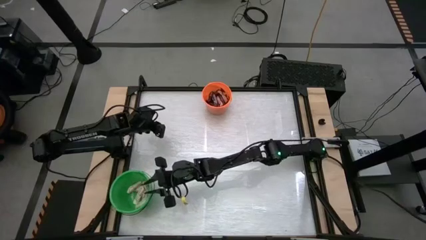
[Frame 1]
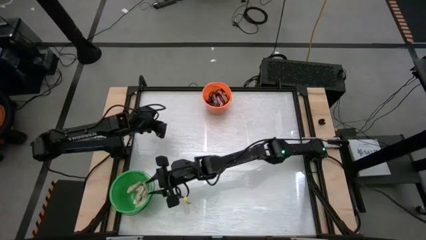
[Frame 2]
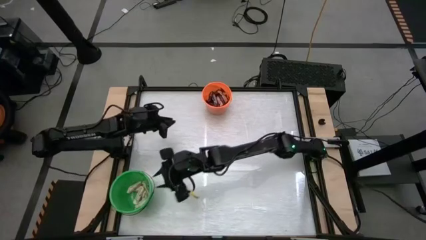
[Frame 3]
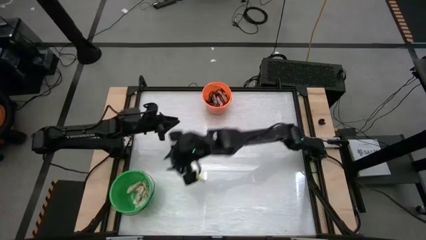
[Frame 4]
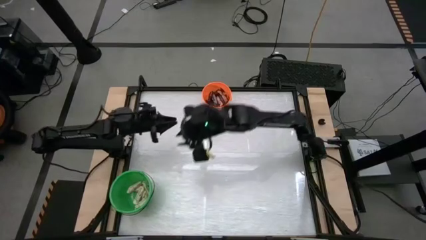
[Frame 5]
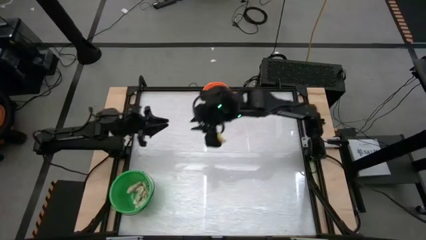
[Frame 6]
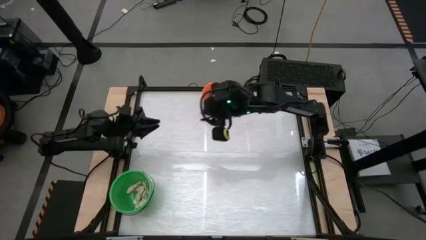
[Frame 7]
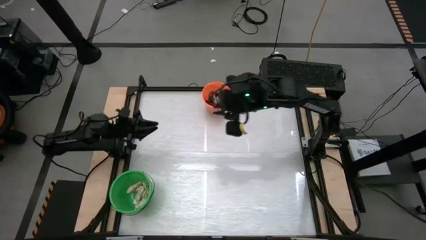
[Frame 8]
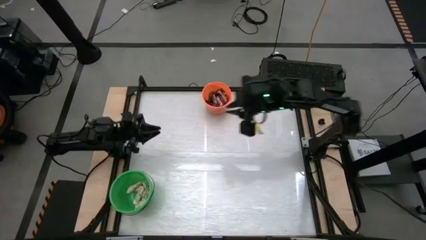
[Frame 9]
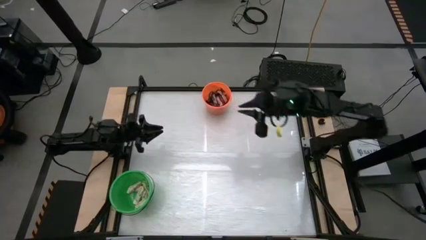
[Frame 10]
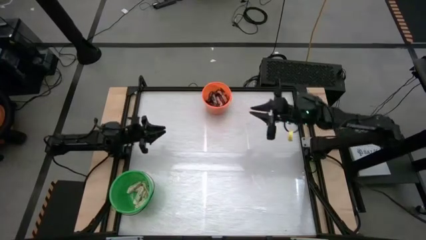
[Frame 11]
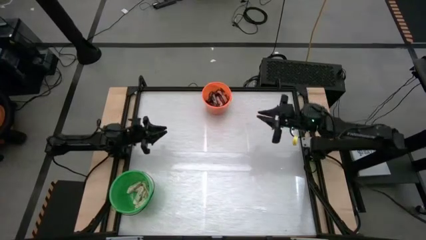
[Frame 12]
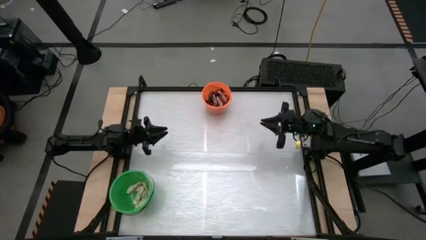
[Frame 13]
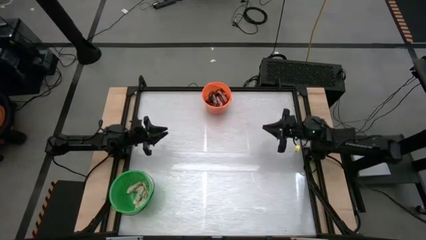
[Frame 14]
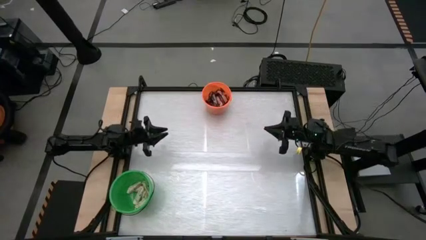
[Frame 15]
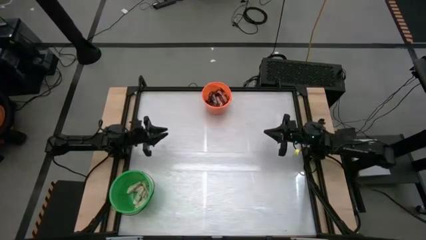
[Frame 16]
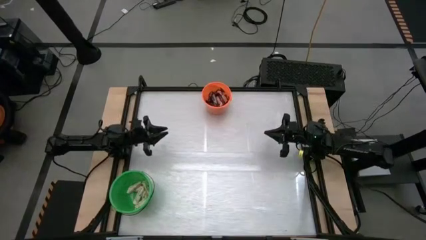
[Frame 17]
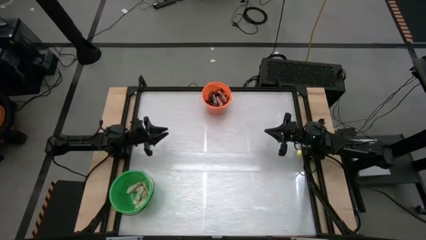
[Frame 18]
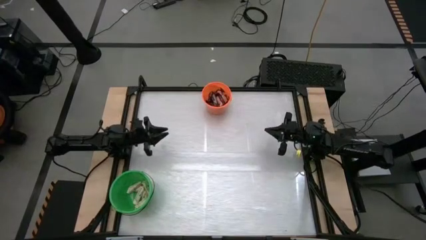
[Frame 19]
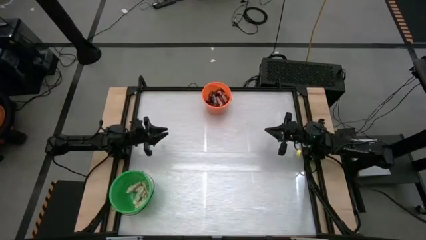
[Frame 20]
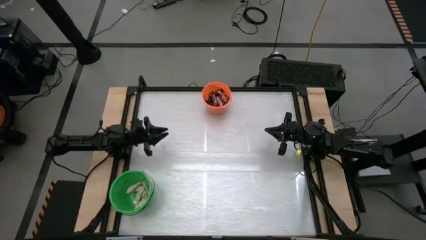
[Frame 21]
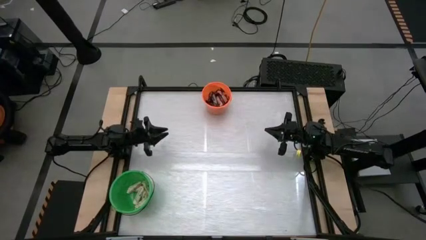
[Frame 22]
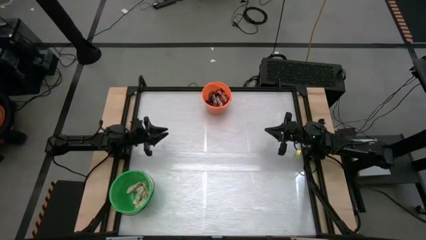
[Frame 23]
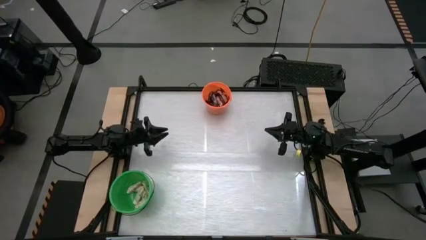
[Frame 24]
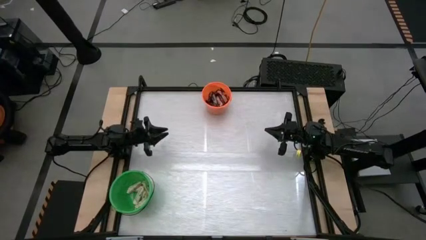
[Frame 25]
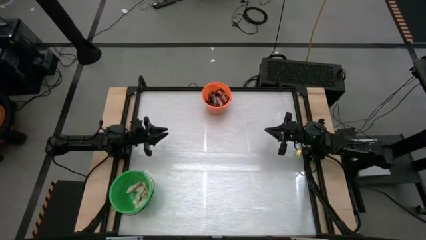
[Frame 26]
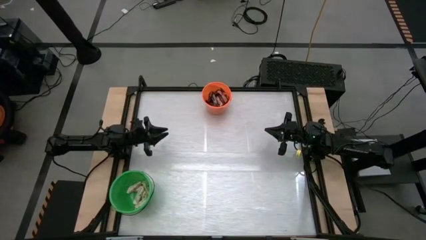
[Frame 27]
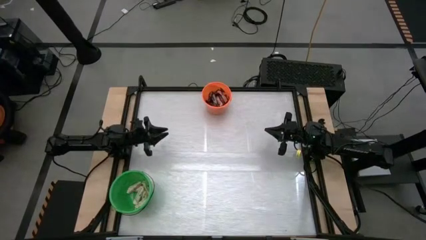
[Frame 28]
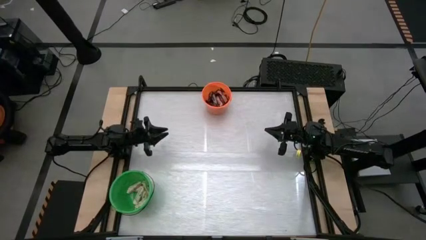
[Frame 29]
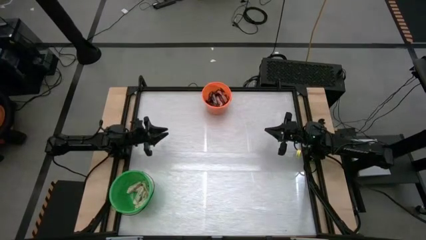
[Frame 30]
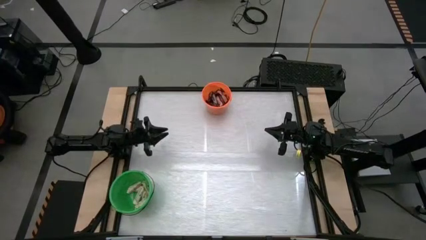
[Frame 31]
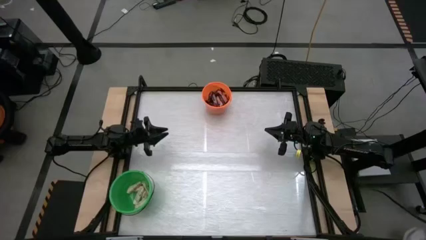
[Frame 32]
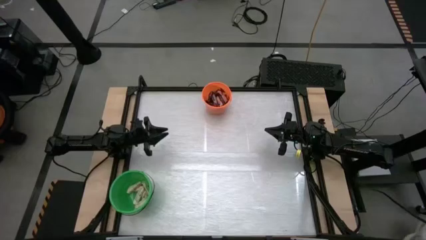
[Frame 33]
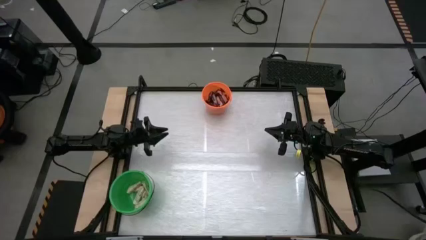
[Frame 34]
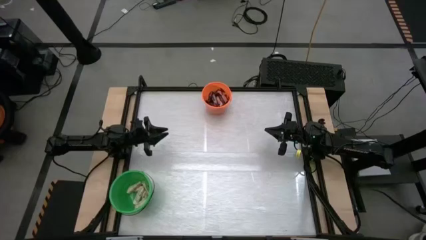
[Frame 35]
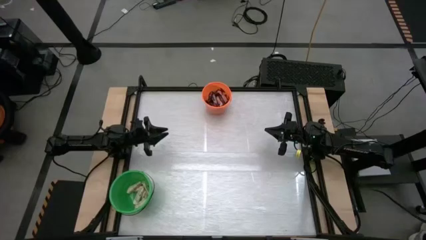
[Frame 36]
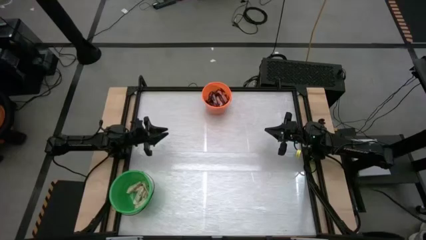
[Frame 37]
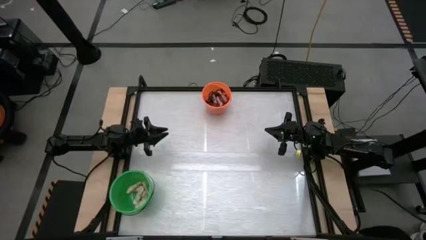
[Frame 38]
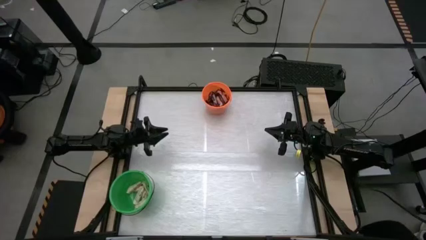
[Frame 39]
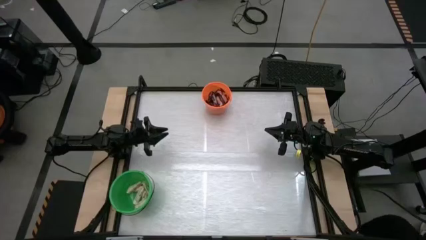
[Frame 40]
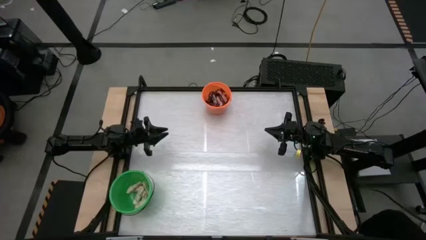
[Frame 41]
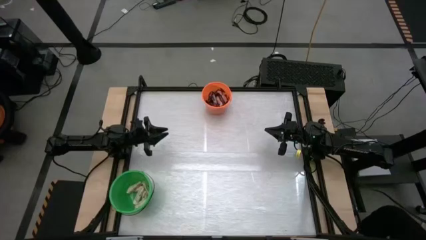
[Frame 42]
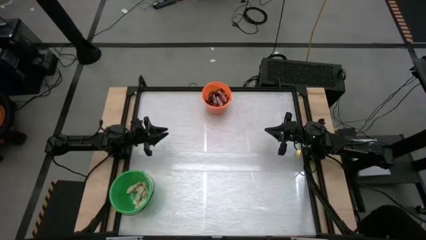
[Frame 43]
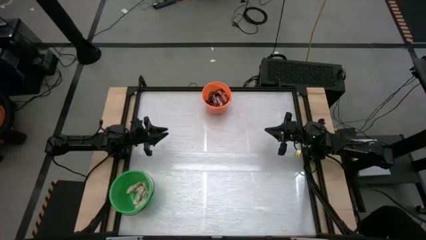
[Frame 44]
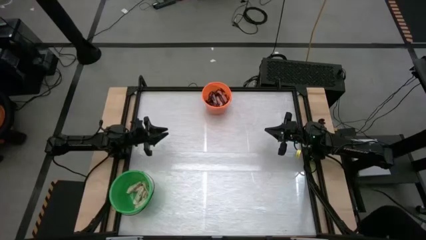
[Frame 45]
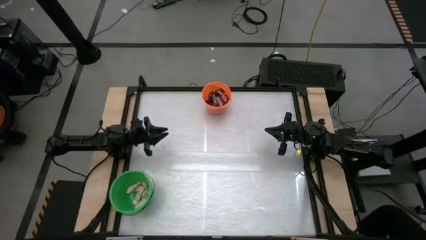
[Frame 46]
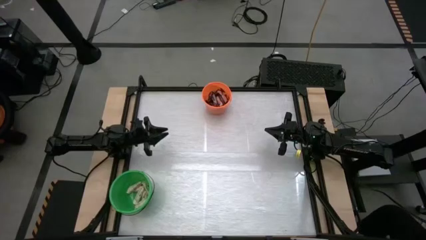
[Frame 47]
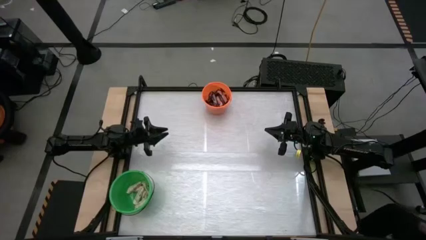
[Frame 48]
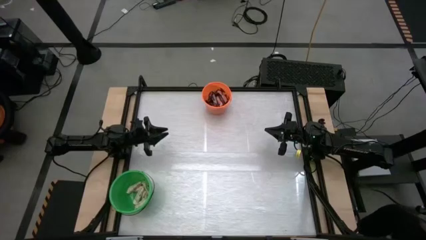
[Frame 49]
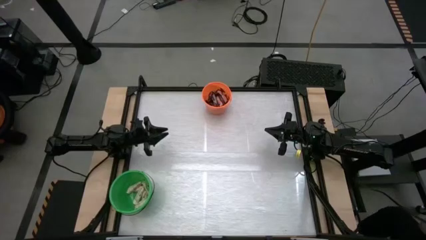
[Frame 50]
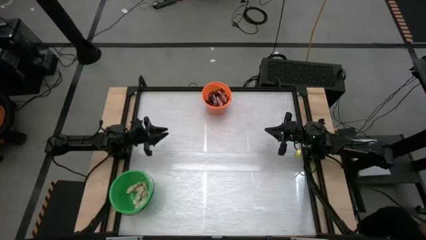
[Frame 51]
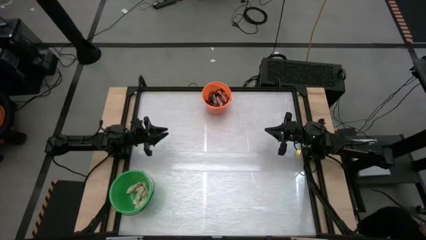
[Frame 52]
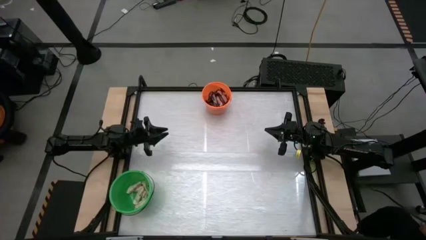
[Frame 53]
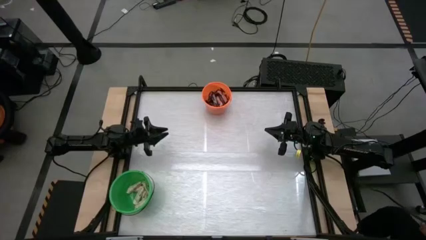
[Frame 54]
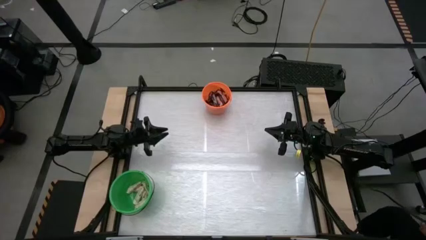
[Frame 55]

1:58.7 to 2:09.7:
Task: Sort candy by brand, put in halloween buckets
Return to Home Position

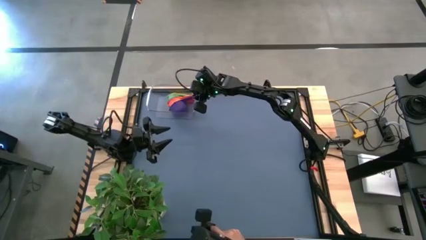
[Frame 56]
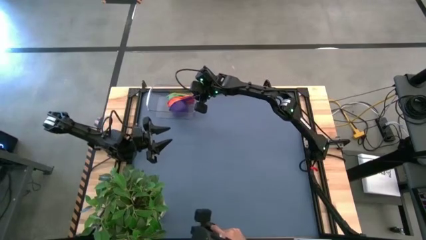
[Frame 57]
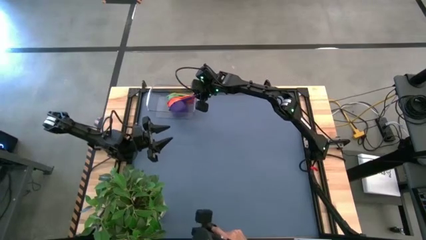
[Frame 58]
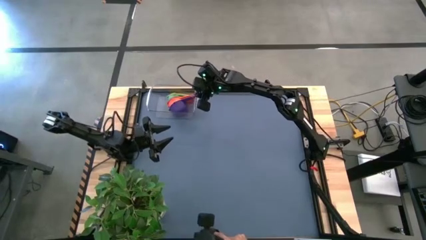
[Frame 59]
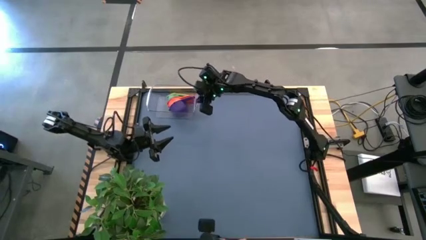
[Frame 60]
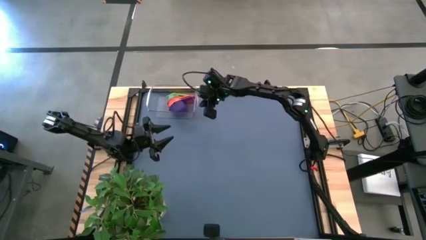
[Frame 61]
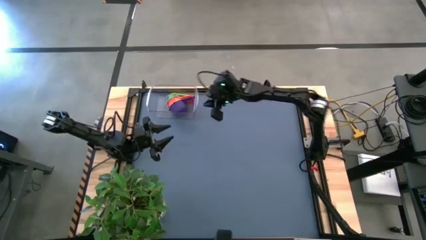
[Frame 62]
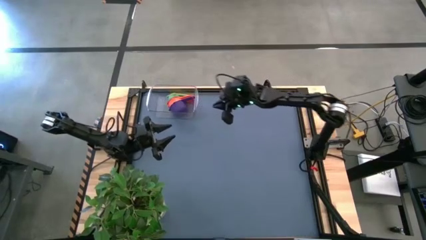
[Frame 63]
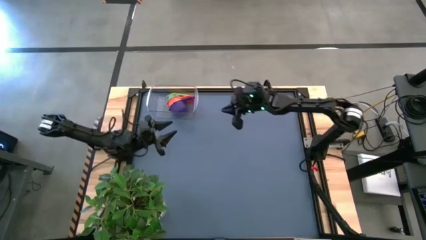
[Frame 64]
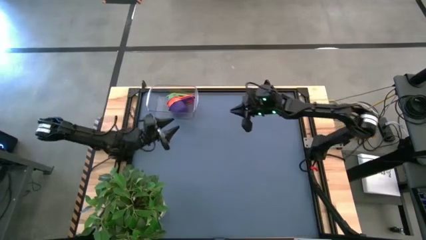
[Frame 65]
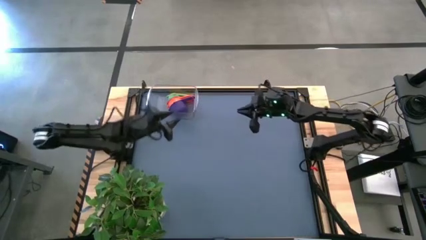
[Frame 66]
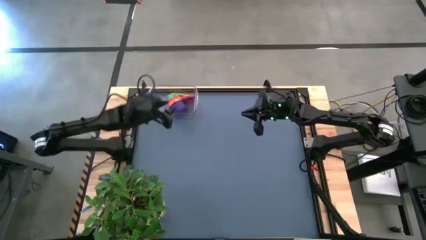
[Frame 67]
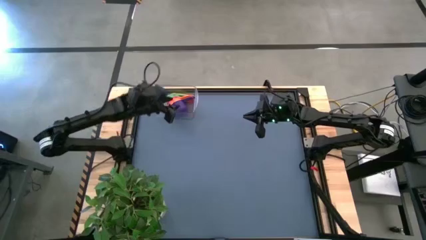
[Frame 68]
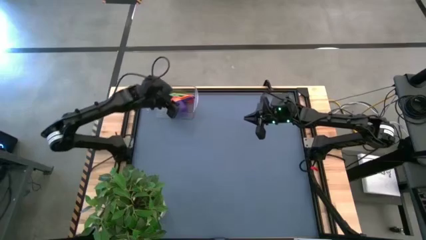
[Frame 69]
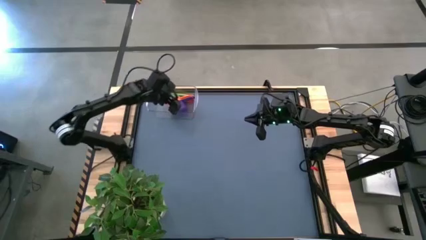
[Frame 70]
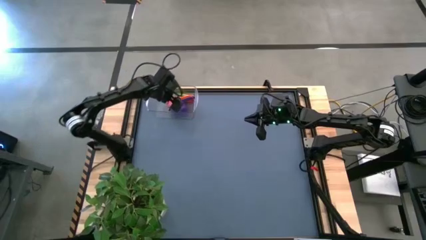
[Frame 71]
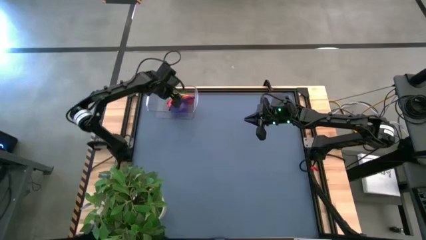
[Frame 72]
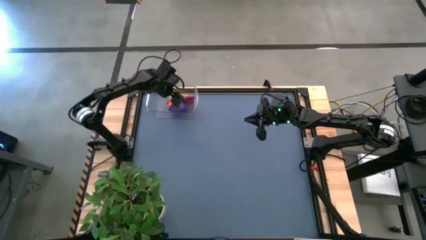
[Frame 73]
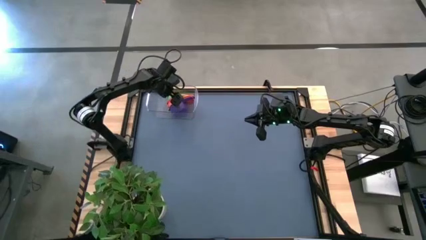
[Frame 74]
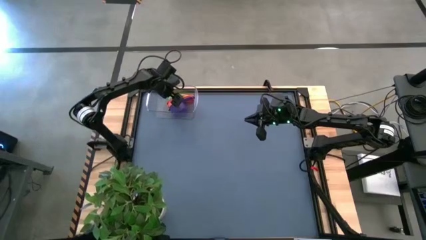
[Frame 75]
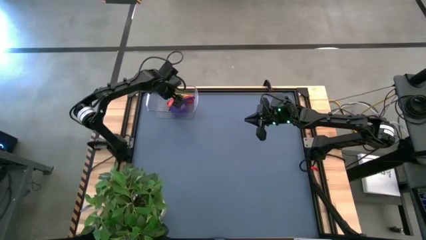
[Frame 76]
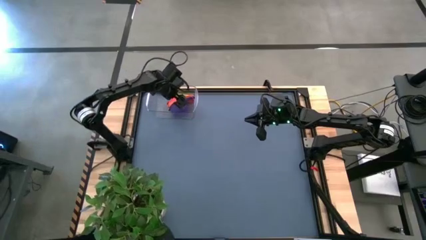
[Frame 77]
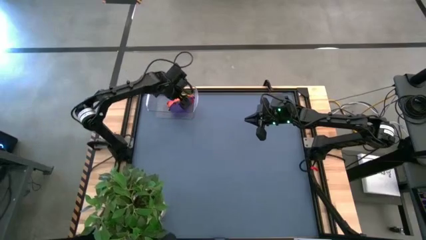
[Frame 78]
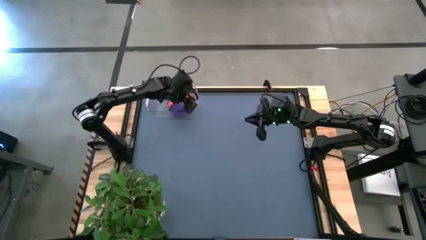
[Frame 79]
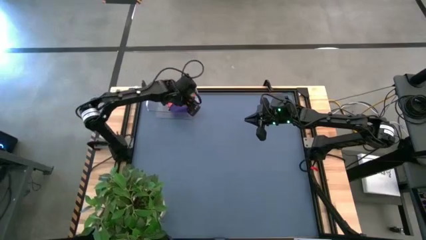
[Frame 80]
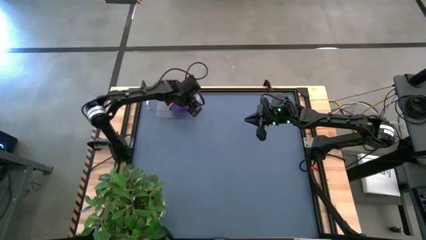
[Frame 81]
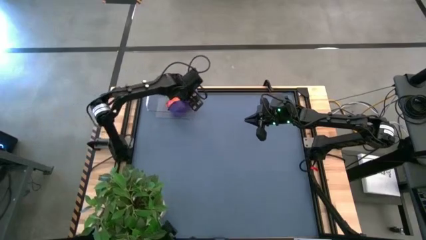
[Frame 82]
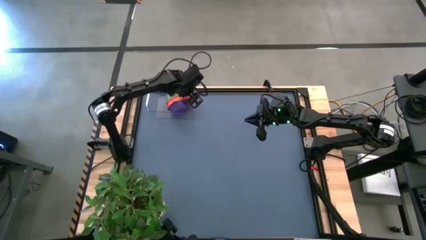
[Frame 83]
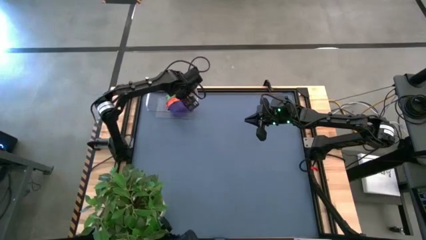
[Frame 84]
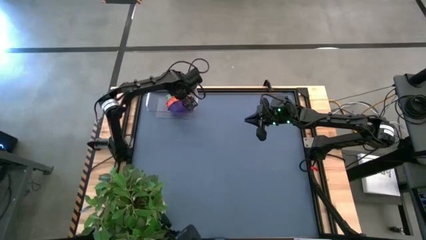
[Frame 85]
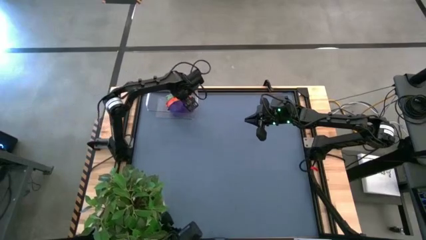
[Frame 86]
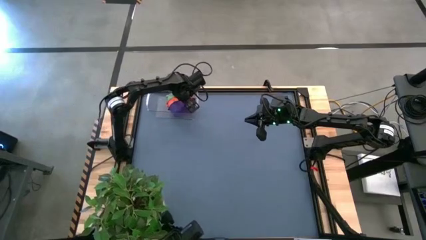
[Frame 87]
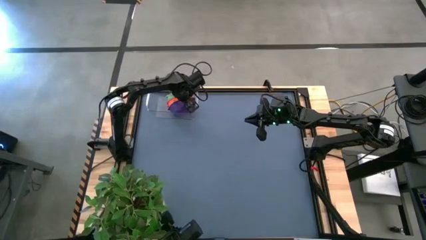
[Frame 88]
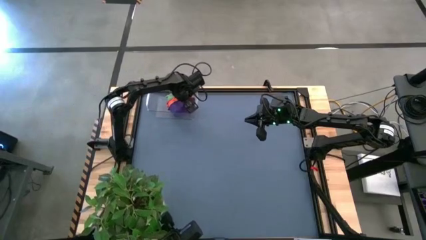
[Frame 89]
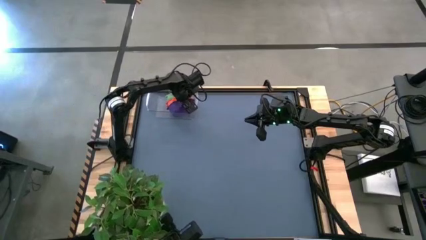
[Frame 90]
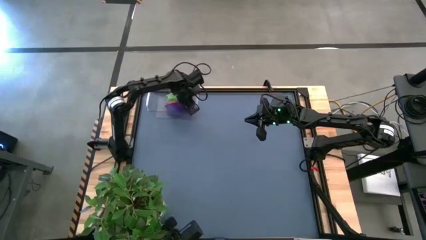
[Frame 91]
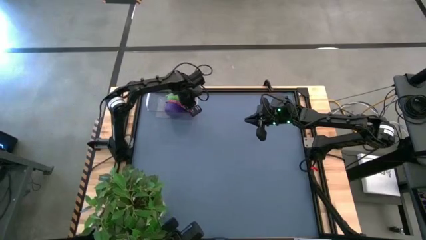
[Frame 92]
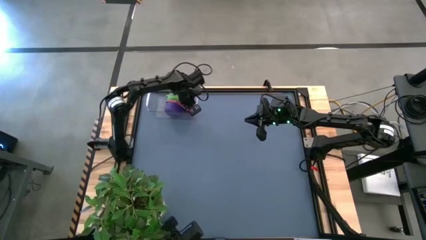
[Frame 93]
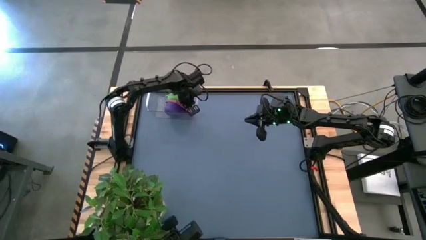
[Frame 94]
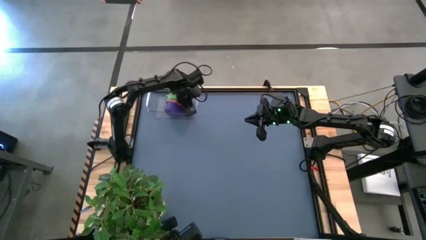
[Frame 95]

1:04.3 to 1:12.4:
Task: Nest measuring cups in basket
Remove the nested measuring cups from the transparent bin
